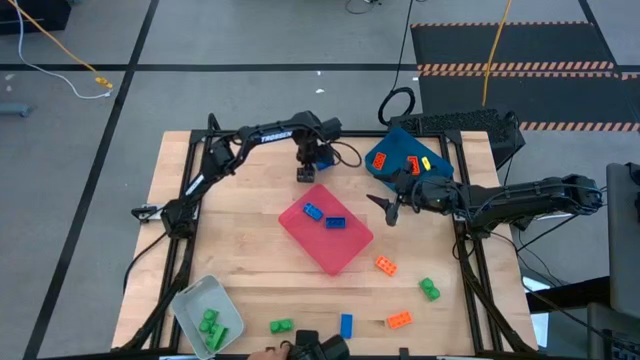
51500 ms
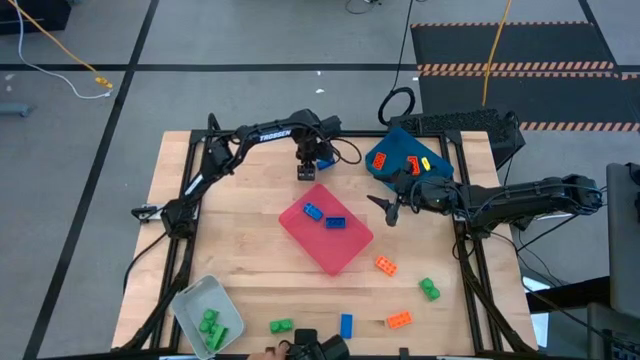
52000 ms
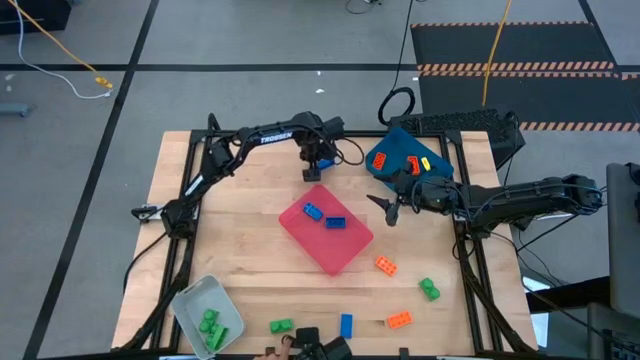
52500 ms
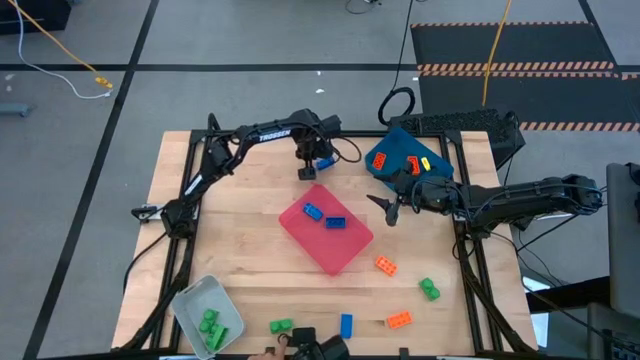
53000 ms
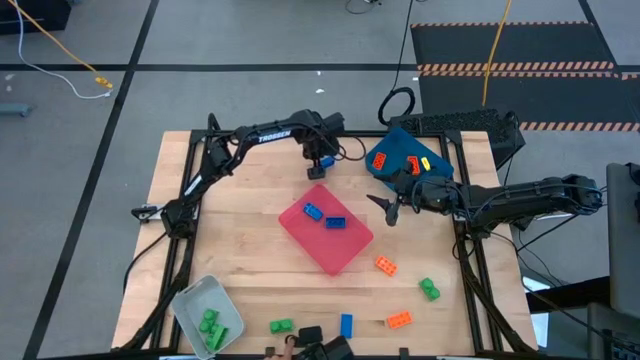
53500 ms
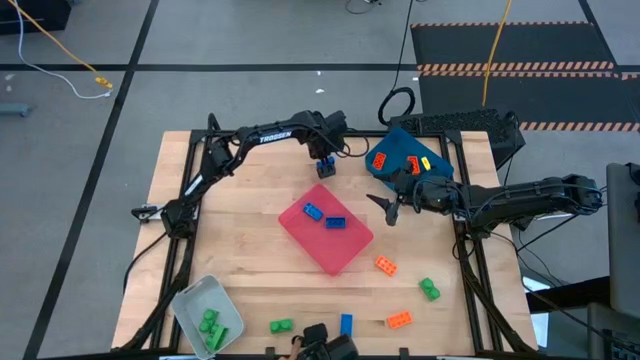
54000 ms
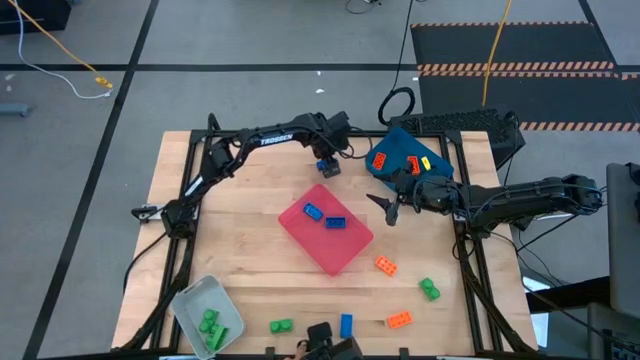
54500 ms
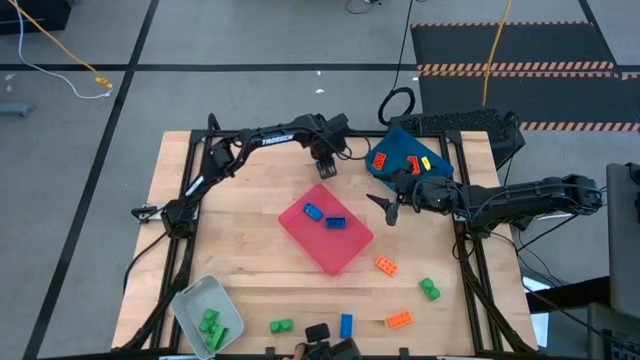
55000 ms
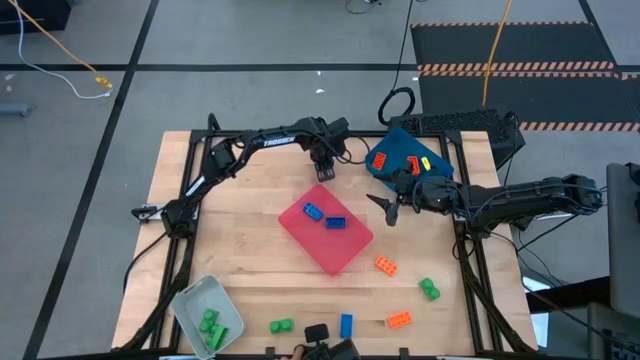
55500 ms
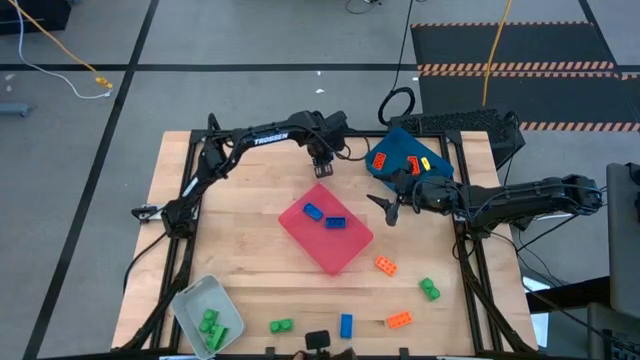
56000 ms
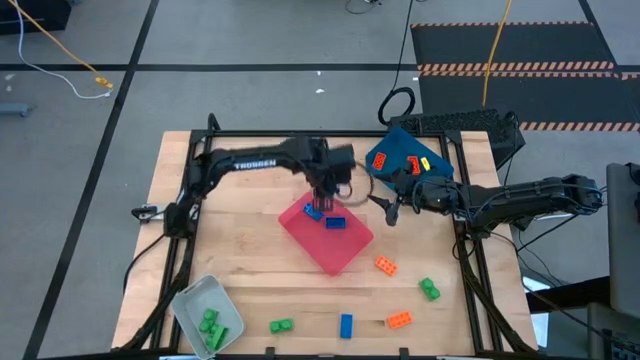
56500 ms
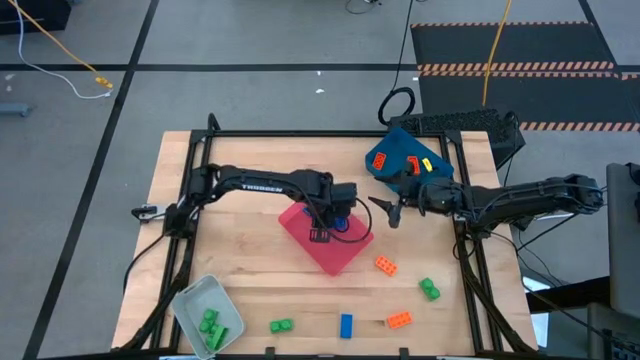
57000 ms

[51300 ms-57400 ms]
Task: Sort & place blocks by color
Put the blue game piece into the red bin

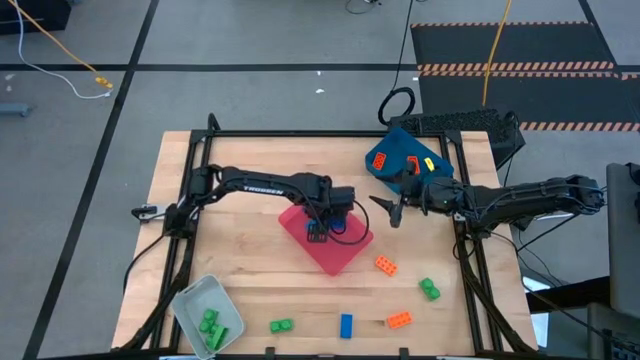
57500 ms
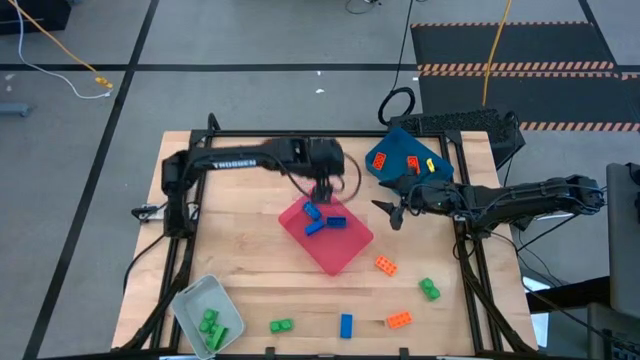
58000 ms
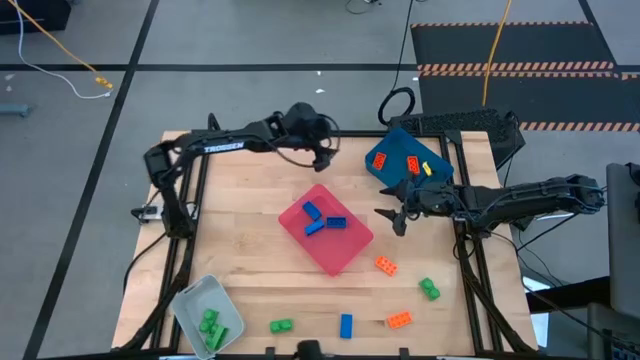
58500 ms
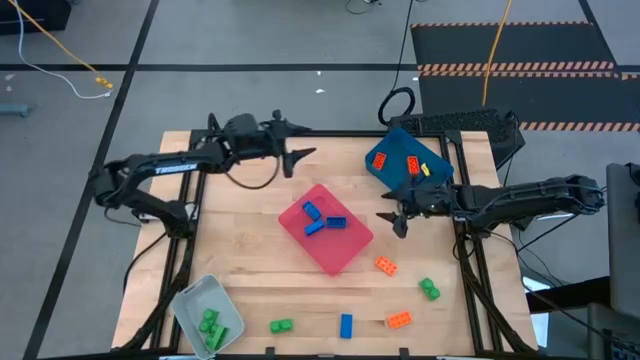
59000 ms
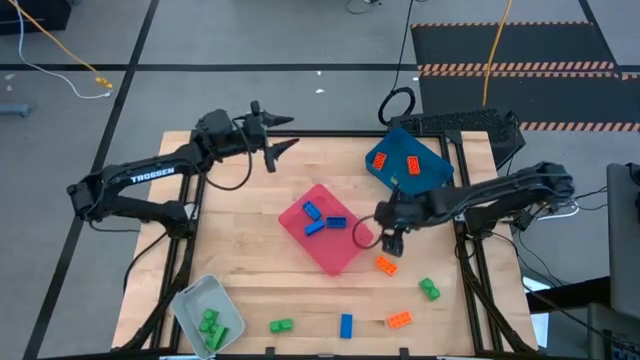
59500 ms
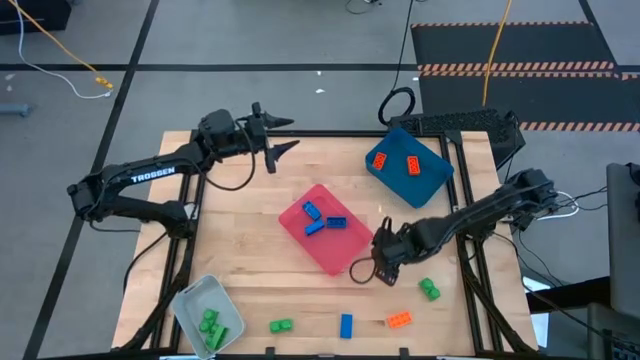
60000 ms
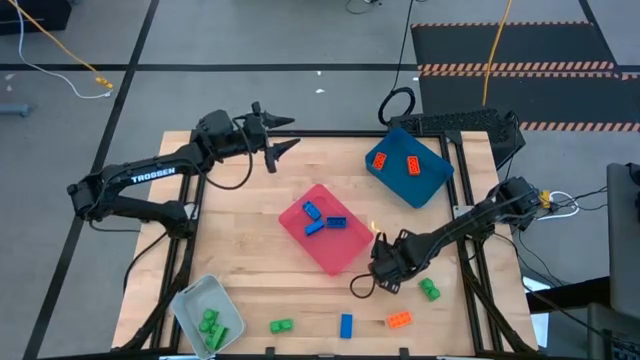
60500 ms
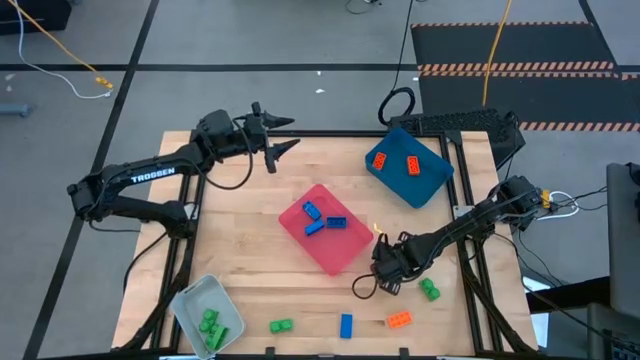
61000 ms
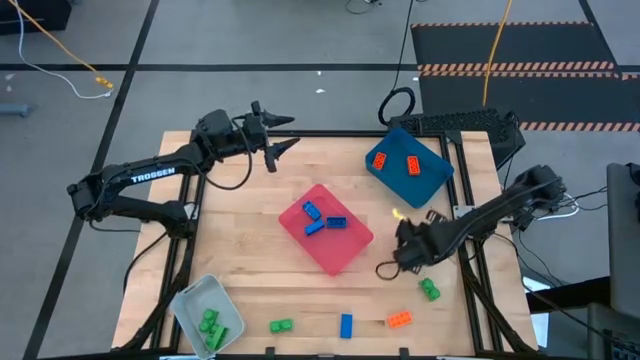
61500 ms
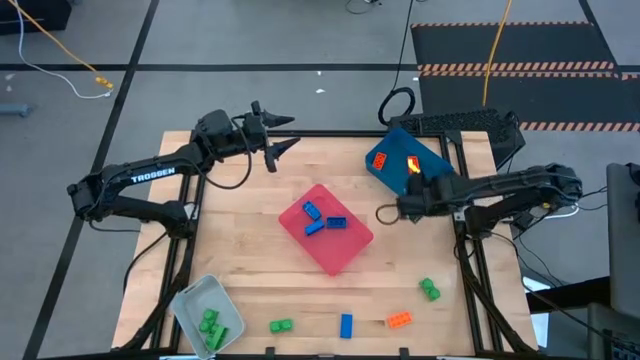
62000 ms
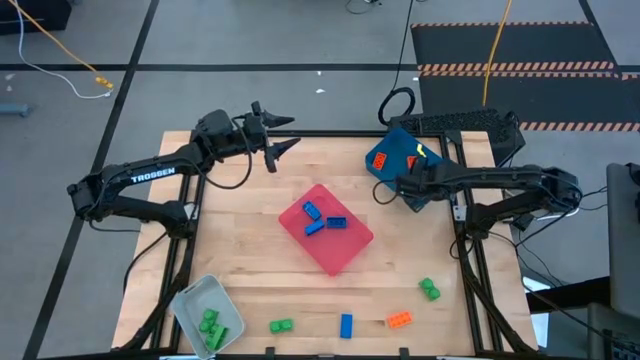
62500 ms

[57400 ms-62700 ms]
Put the orange game piece into the blue bin

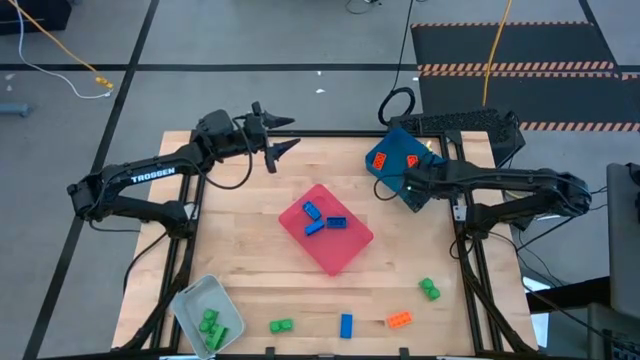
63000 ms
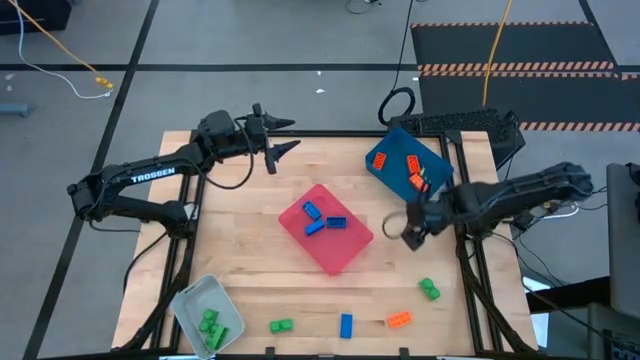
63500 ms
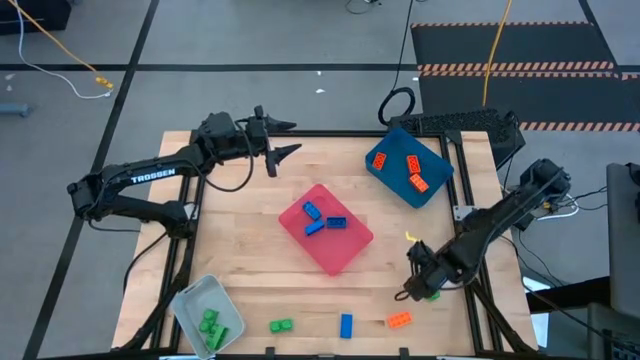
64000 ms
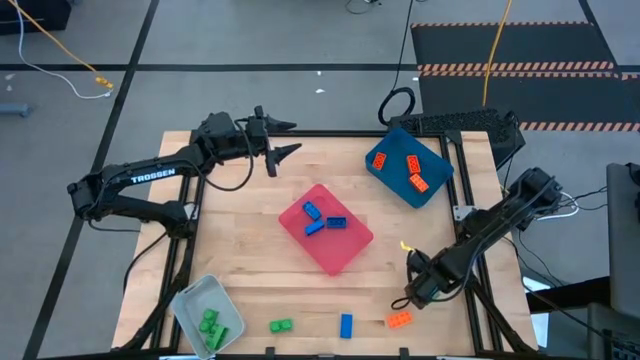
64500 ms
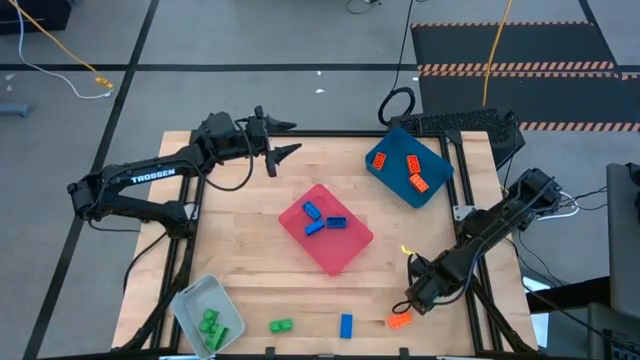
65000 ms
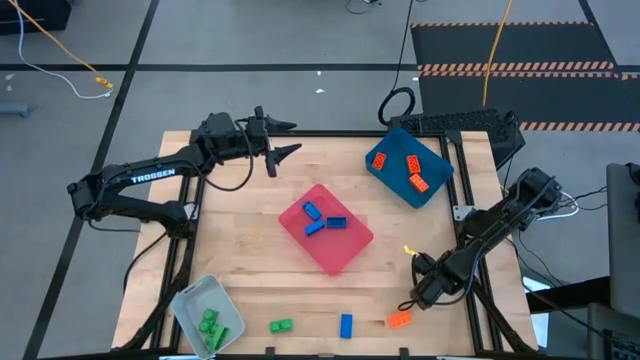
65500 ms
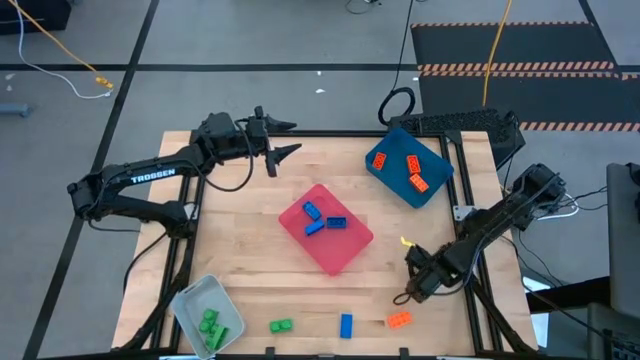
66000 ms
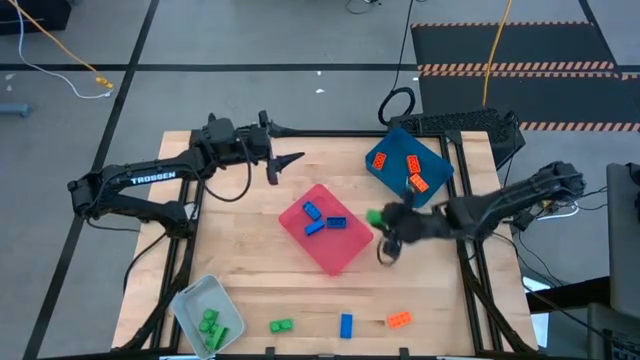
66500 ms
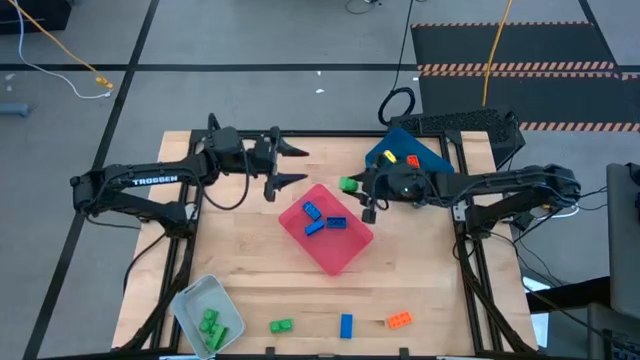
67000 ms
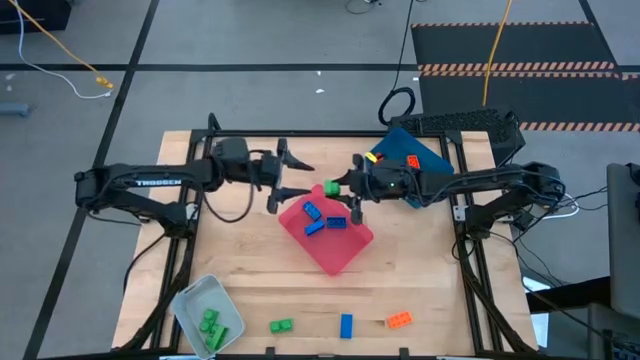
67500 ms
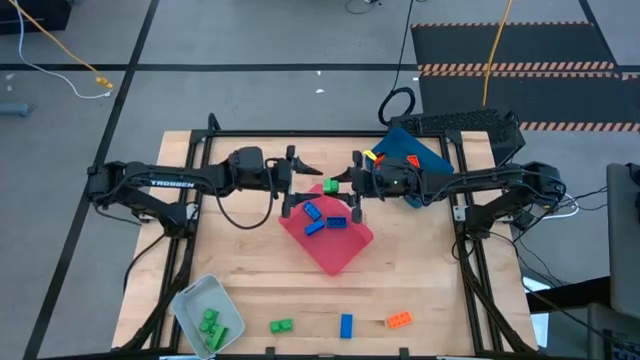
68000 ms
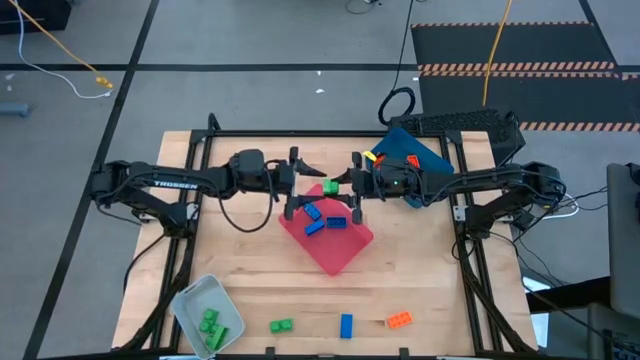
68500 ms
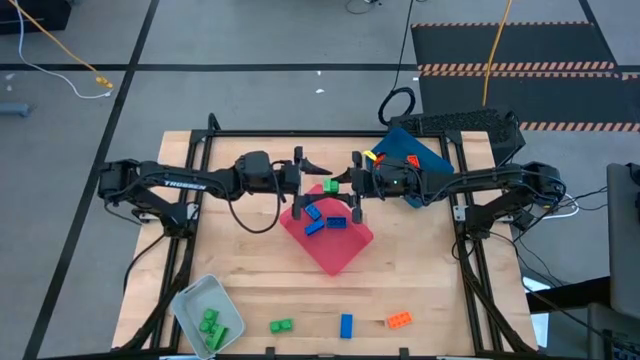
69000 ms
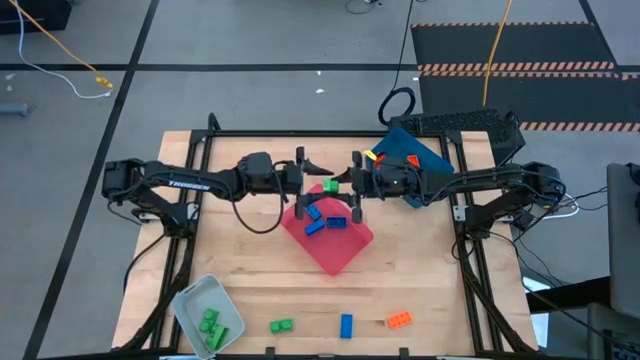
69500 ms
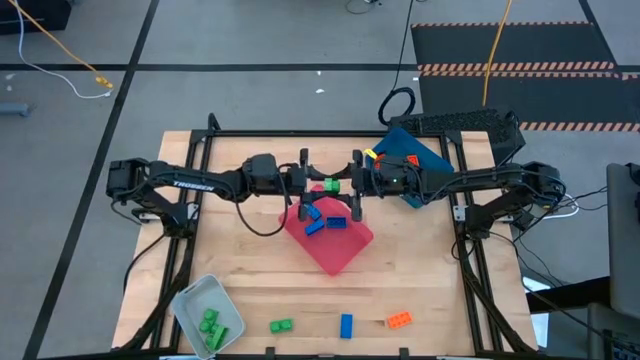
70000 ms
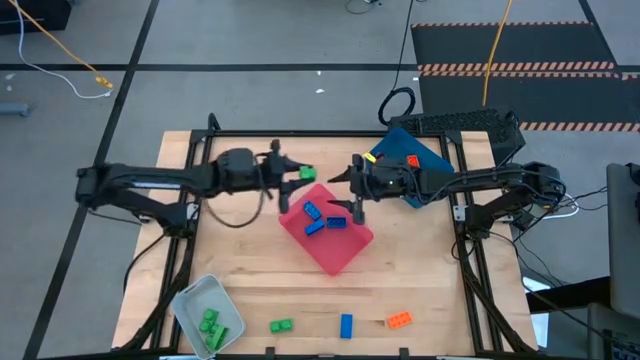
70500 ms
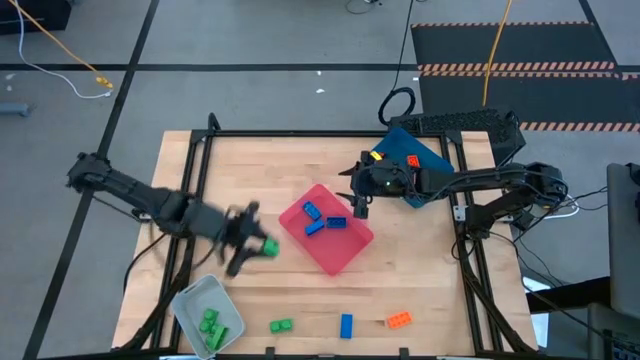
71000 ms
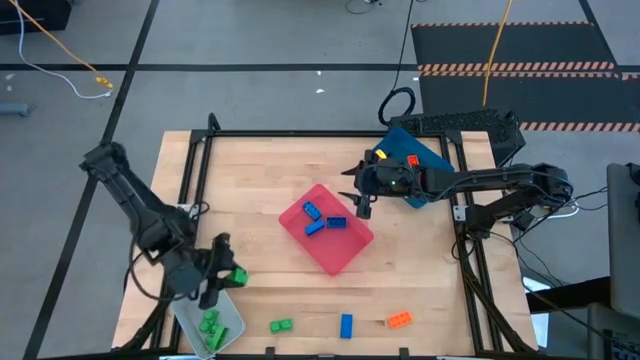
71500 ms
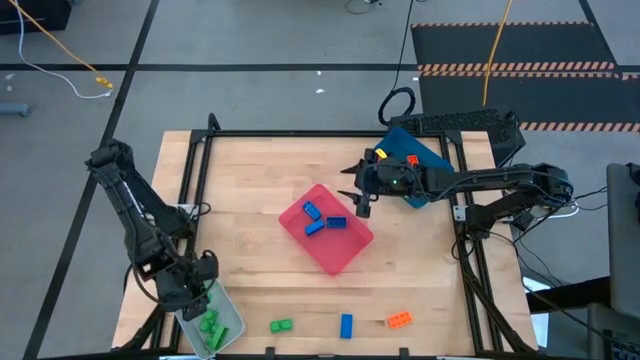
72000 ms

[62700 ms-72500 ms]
Put the green game piece into the gray bin

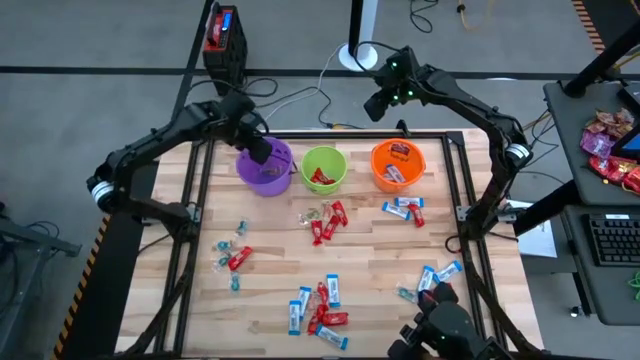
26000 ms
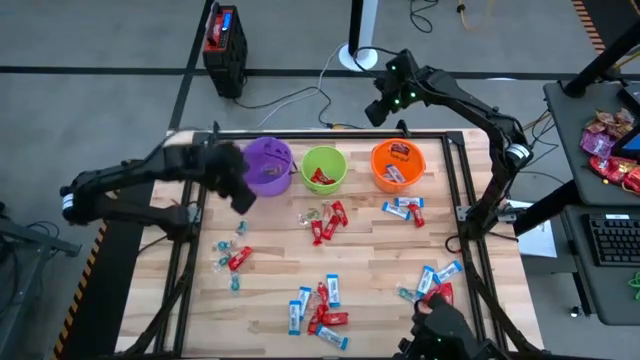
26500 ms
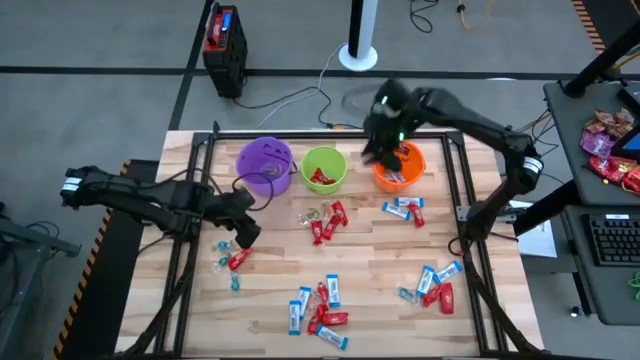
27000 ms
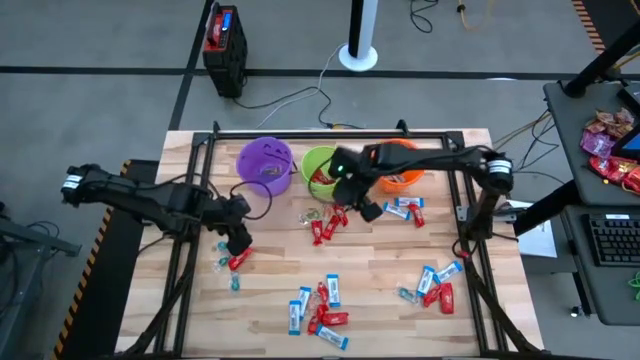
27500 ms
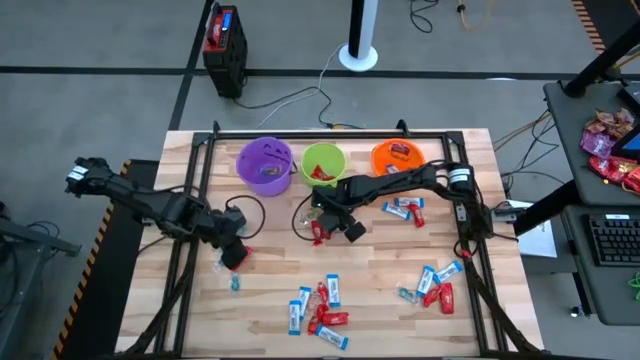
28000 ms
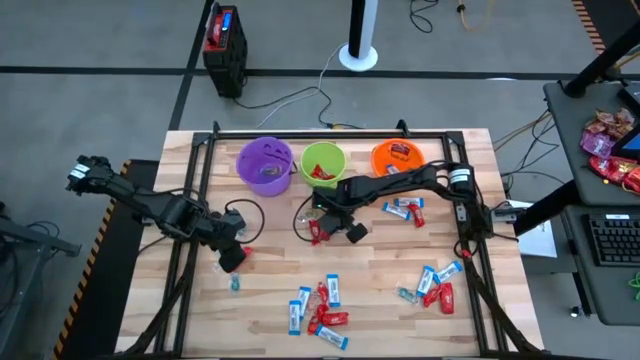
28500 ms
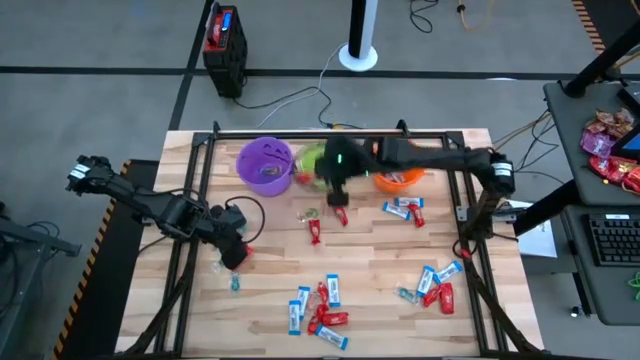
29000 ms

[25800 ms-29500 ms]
Task: Sort candy by brand, put in halloween buckets
Put the red chocolate bar into the green bucket
